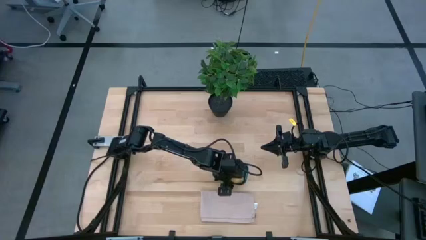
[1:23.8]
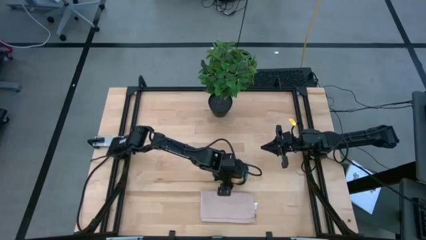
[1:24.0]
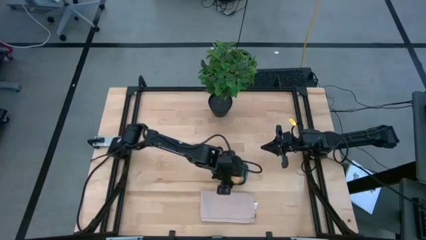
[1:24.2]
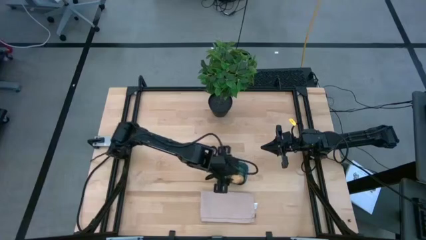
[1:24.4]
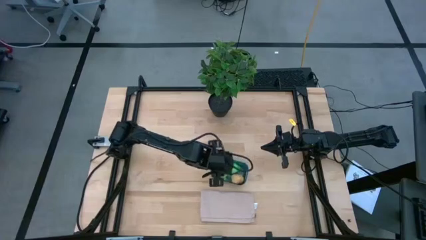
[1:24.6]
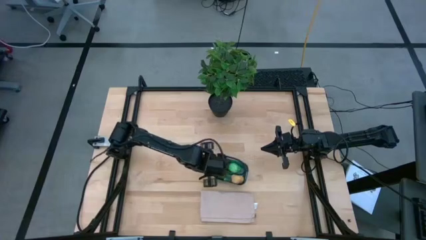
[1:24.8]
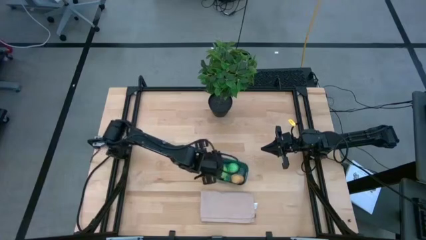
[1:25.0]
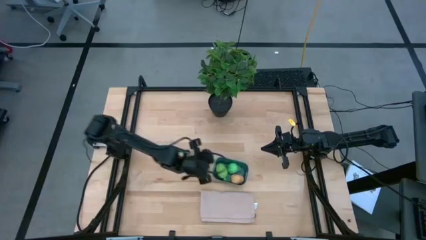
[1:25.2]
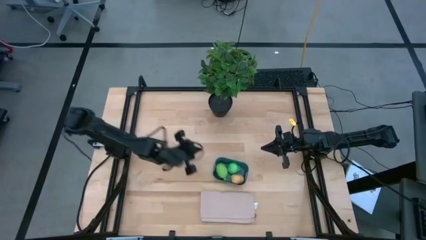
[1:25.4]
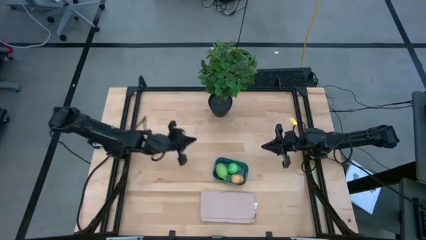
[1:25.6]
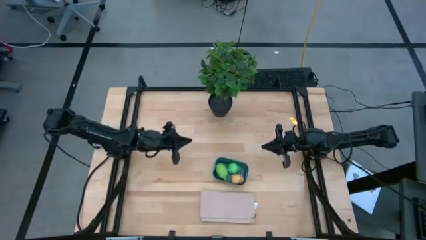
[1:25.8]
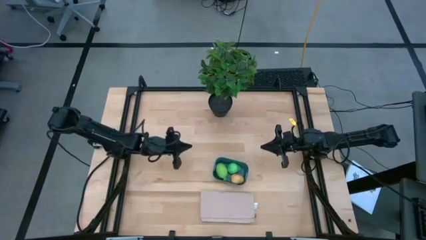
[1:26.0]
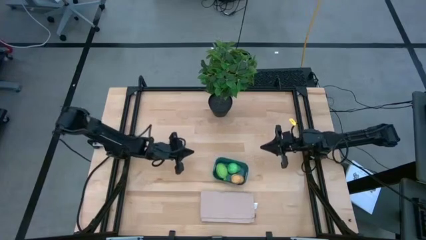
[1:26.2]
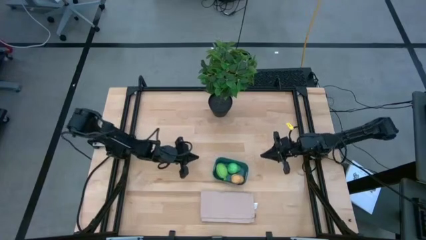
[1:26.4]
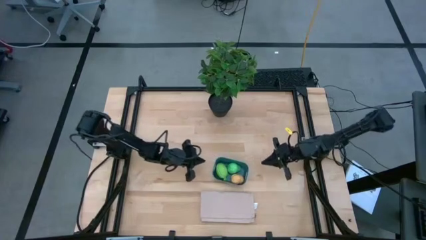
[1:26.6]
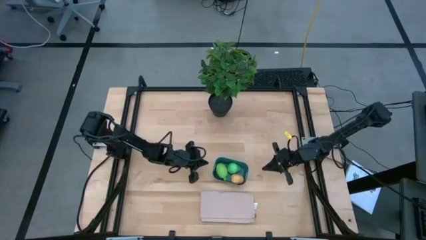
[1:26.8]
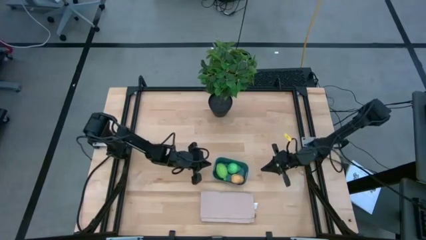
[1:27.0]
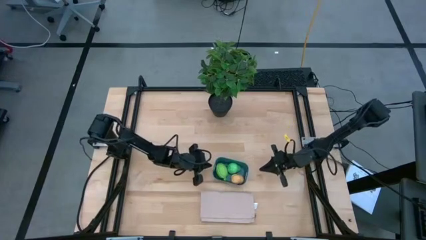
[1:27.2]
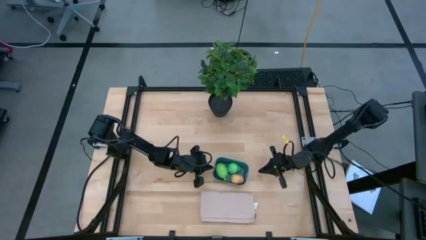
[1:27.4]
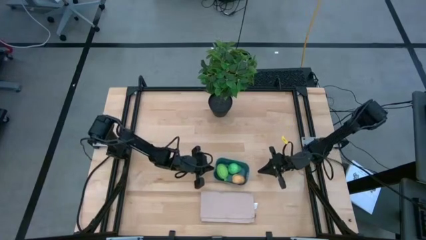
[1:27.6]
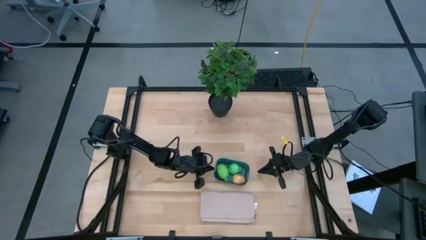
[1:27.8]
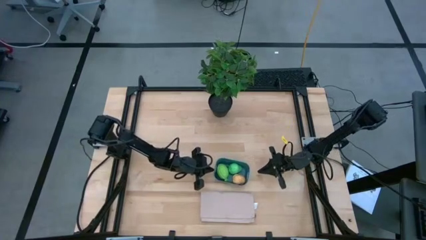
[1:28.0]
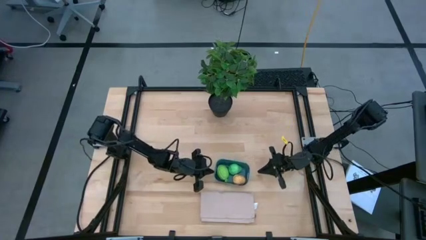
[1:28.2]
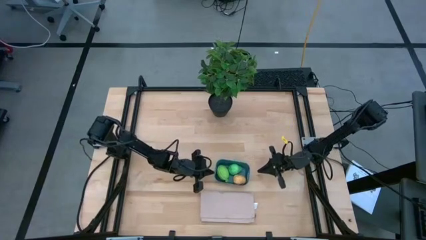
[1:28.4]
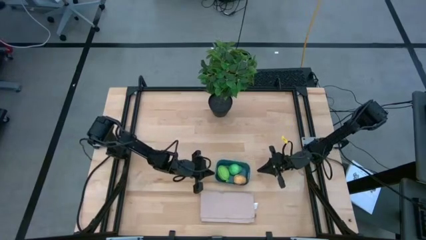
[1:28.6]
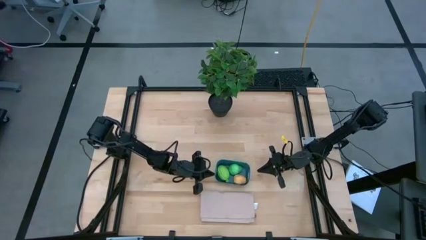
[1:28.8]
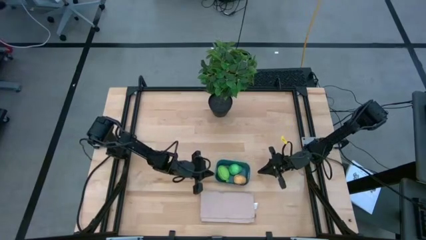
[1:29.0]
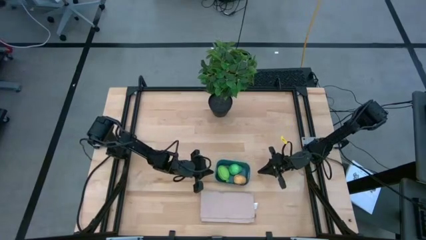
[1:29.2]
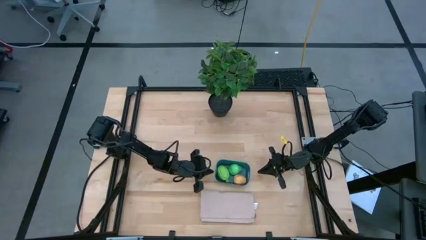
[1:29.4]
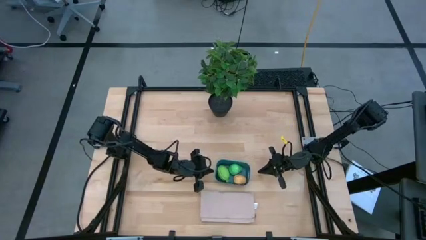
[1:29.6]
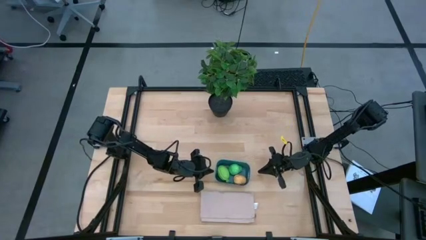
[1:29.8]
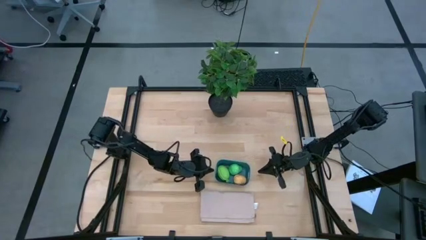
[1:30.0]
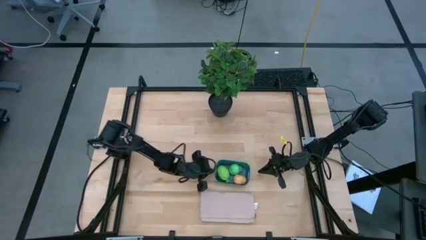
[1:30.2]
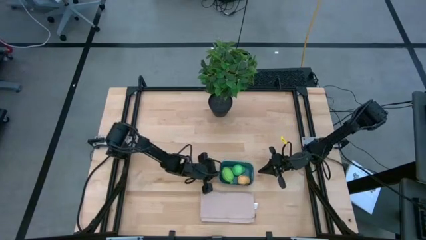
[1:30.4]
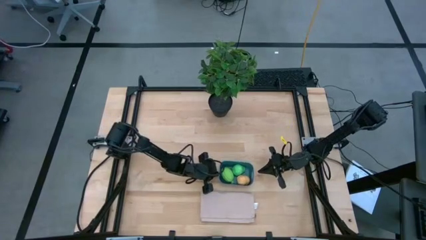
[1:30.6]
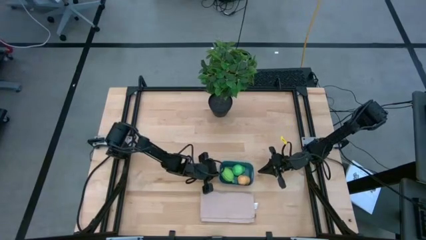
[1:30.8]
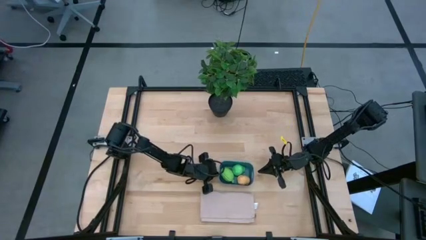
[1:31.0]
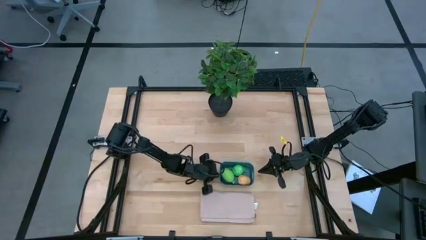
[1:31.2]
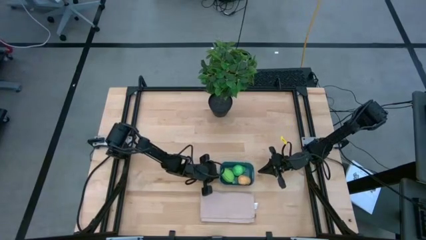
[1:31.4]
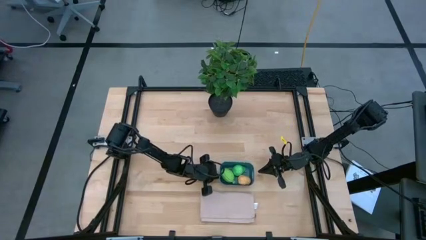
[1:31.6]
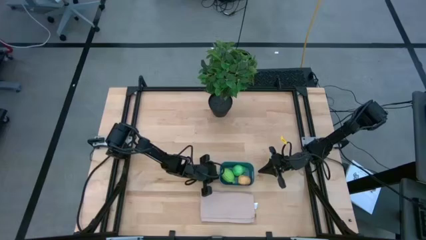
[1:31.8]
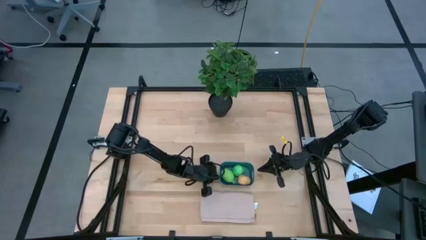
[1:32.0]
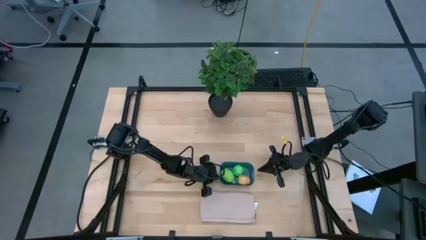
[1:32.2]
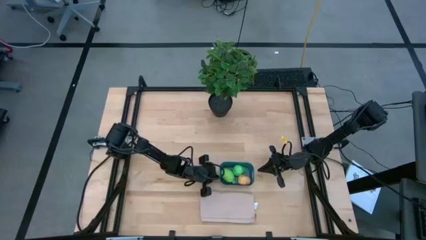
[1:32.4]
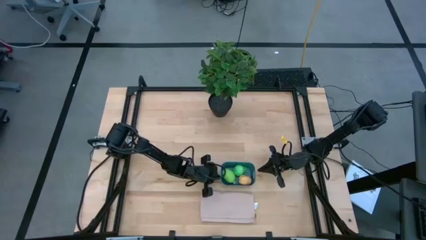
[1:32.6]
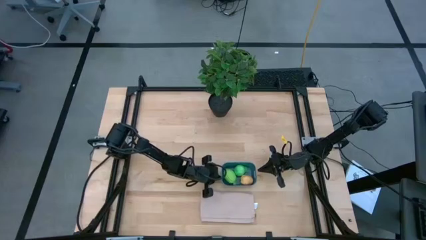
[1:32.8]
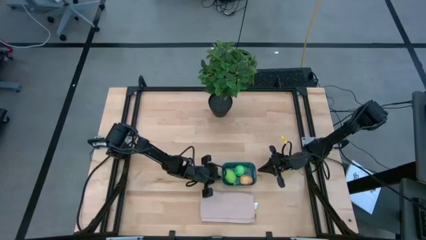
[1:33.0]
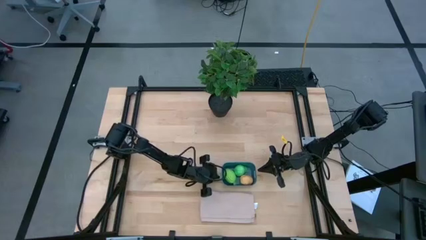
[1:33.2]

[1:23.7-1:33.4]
Task: Pick and placing Produce into tupperware
Adjust the blue bin
